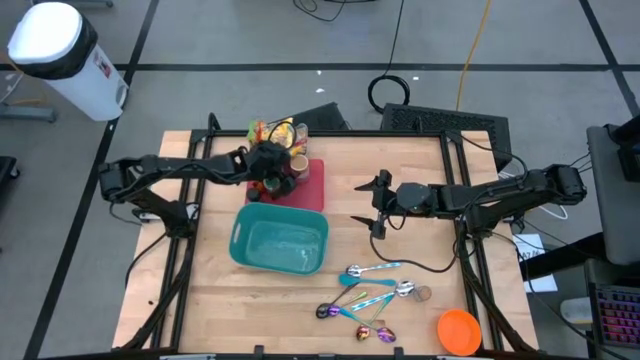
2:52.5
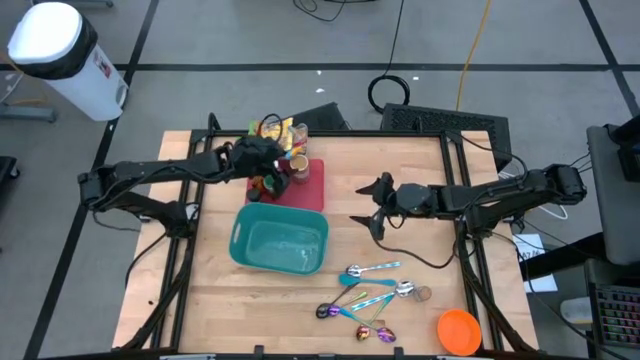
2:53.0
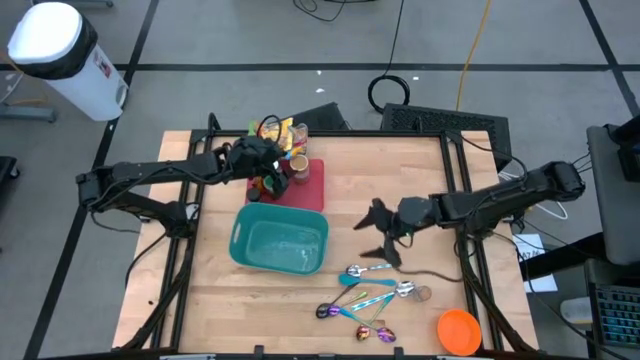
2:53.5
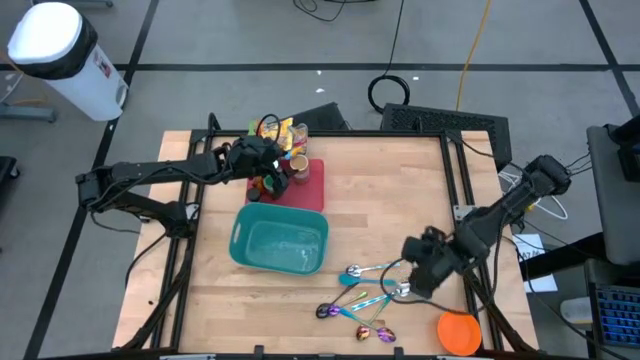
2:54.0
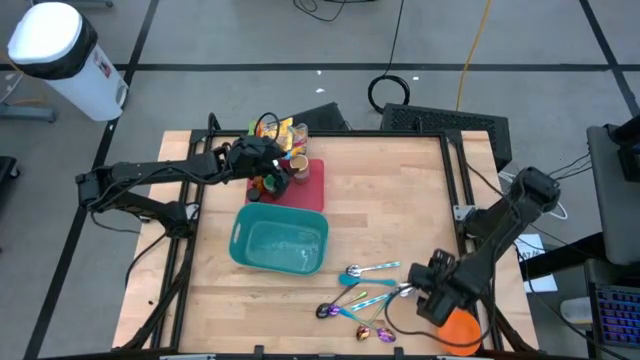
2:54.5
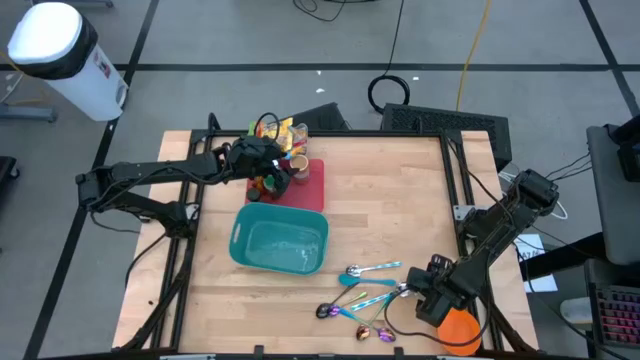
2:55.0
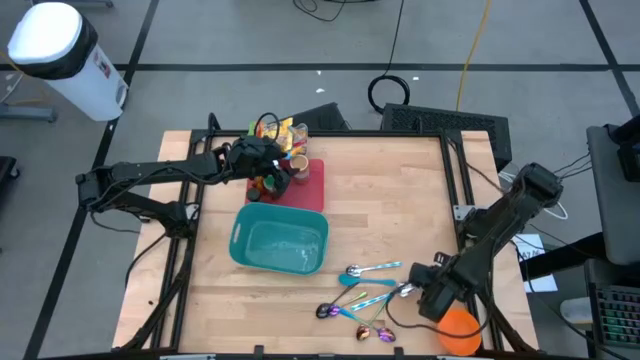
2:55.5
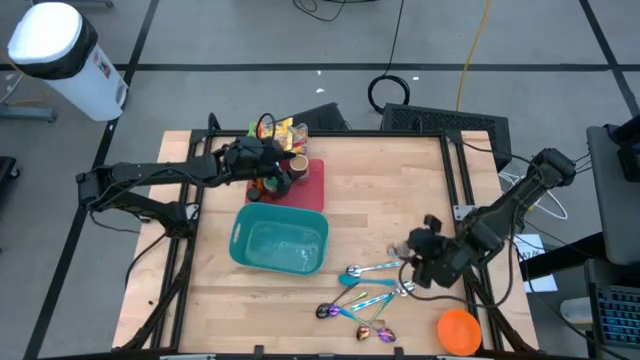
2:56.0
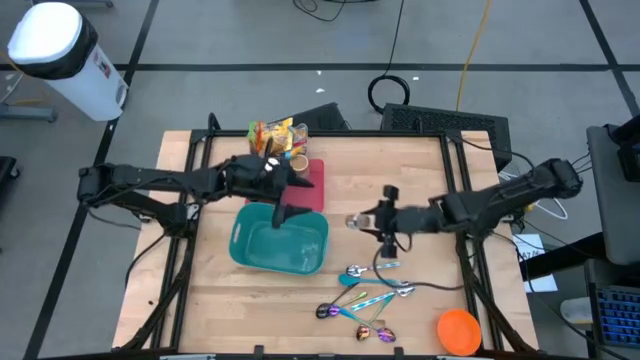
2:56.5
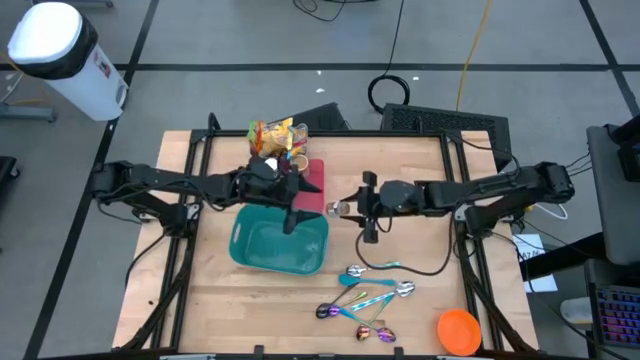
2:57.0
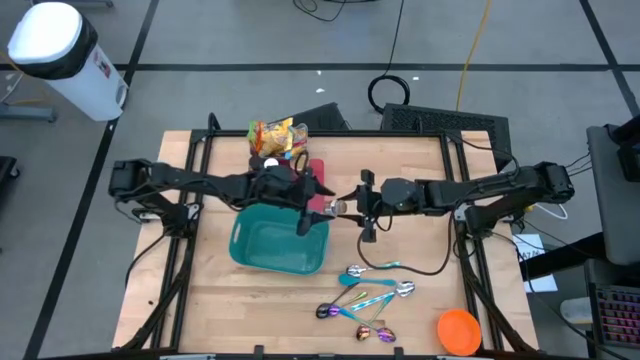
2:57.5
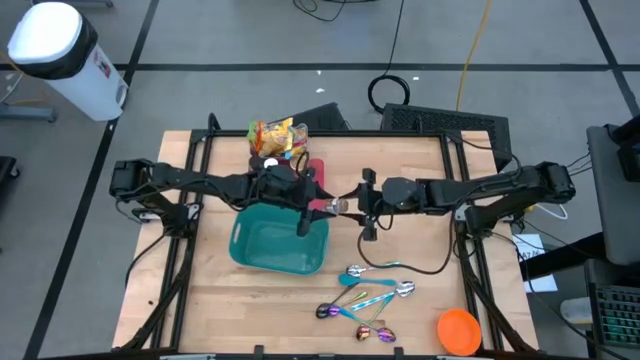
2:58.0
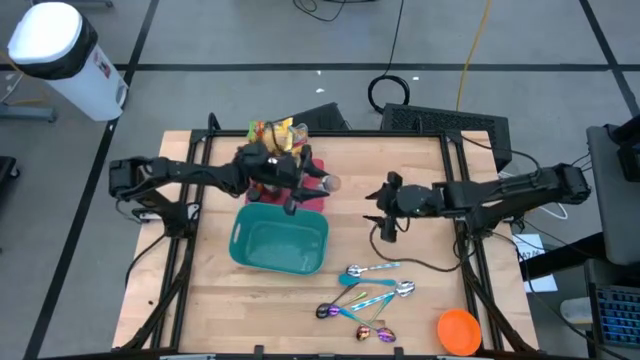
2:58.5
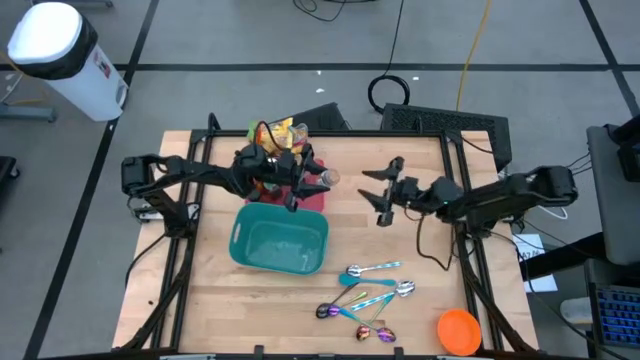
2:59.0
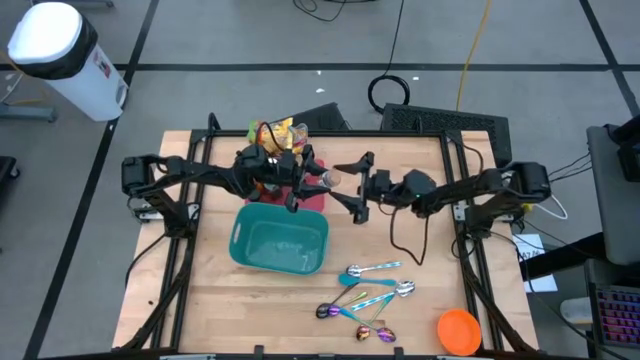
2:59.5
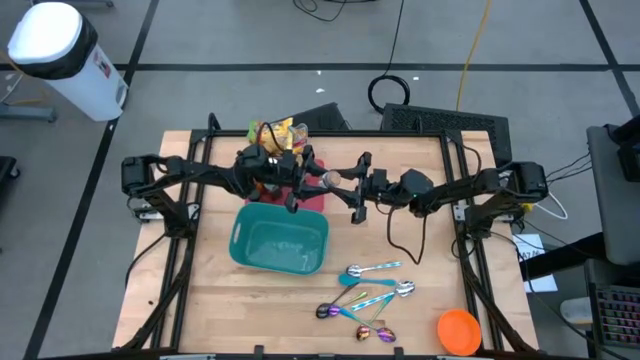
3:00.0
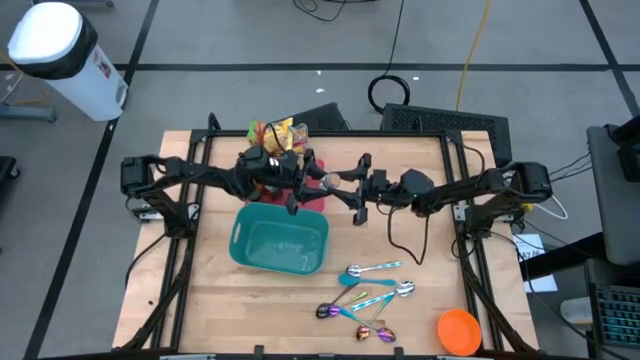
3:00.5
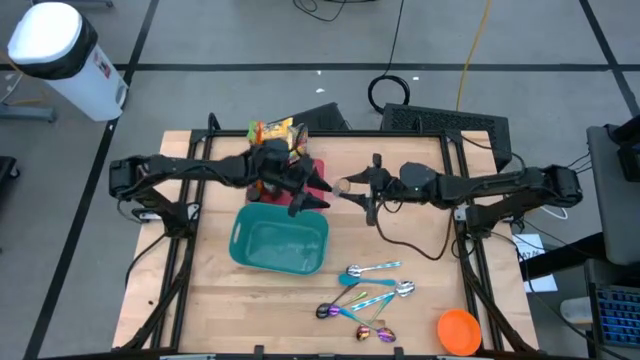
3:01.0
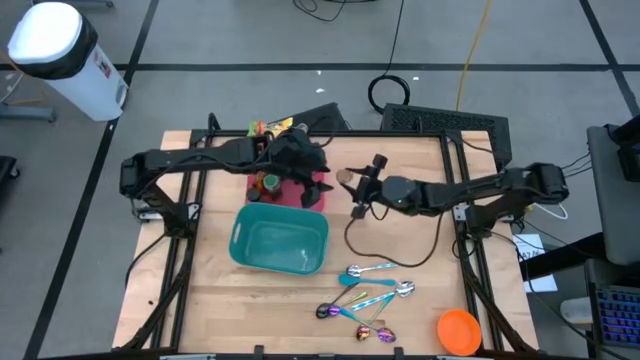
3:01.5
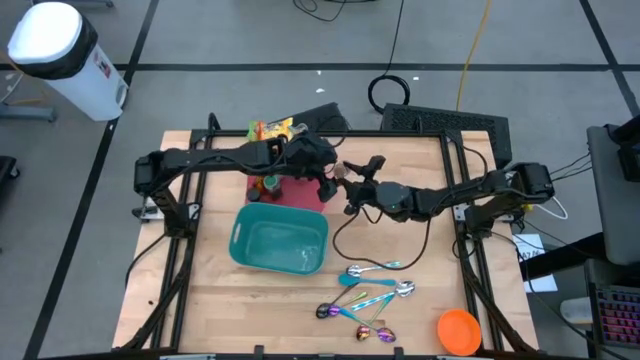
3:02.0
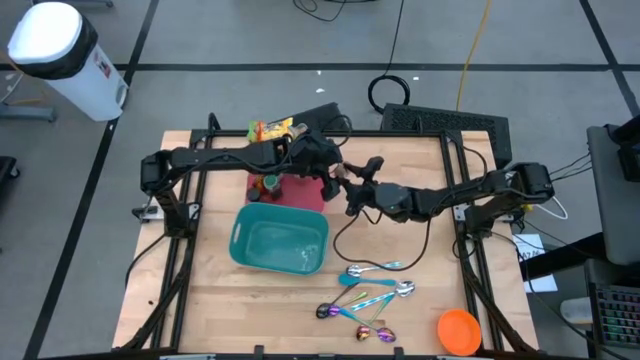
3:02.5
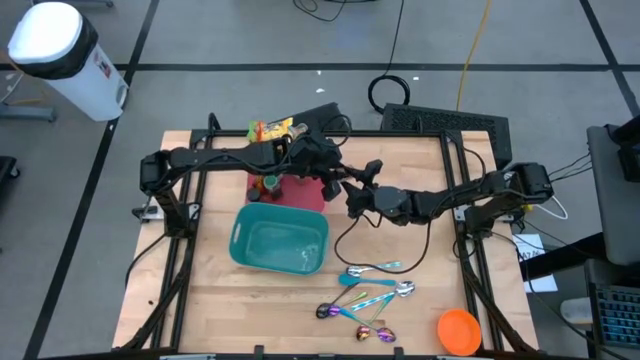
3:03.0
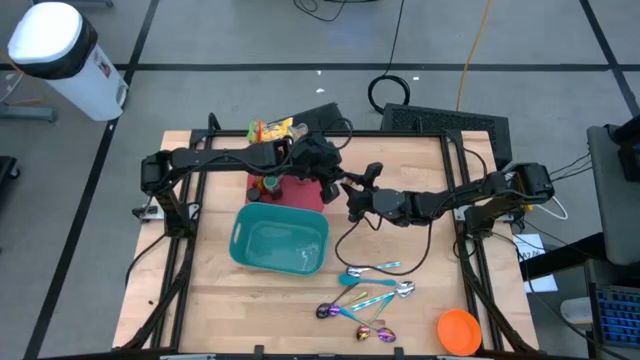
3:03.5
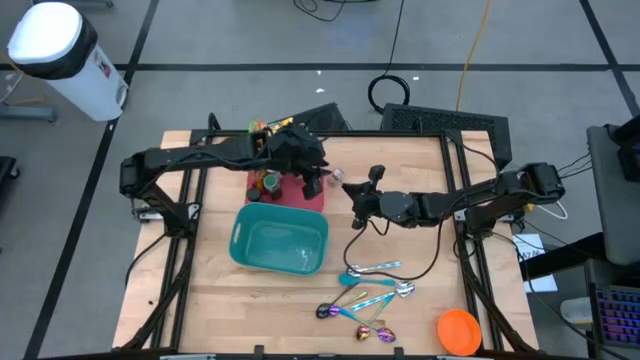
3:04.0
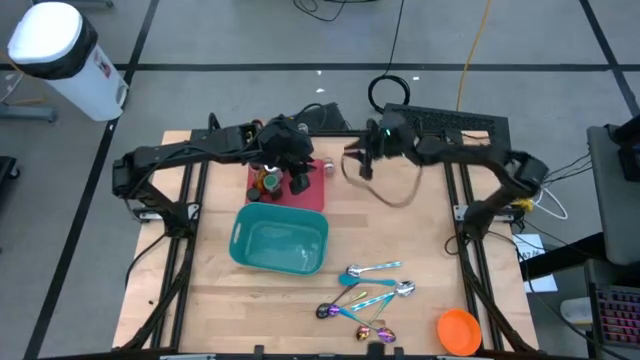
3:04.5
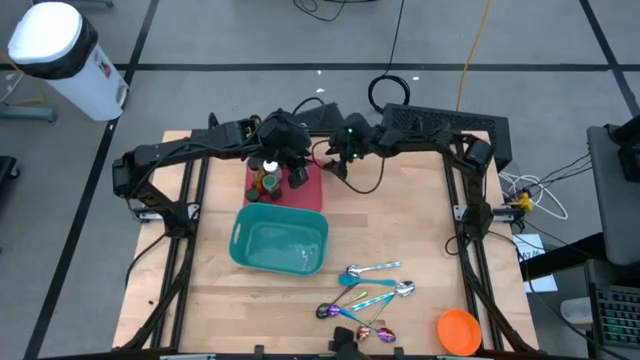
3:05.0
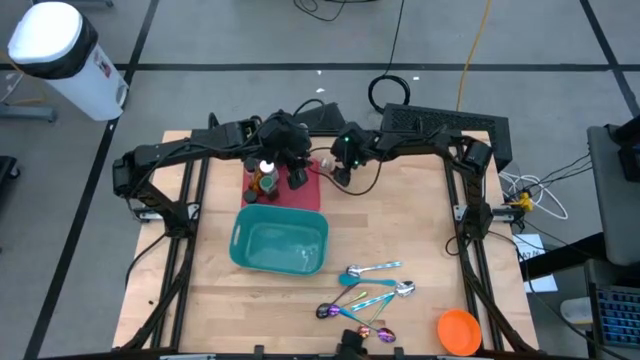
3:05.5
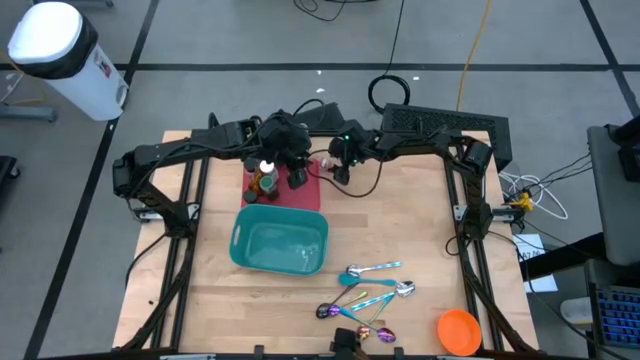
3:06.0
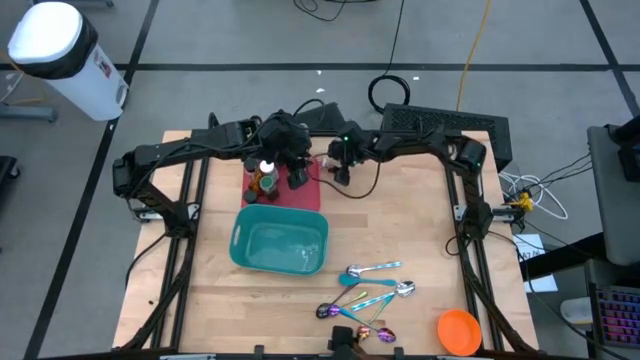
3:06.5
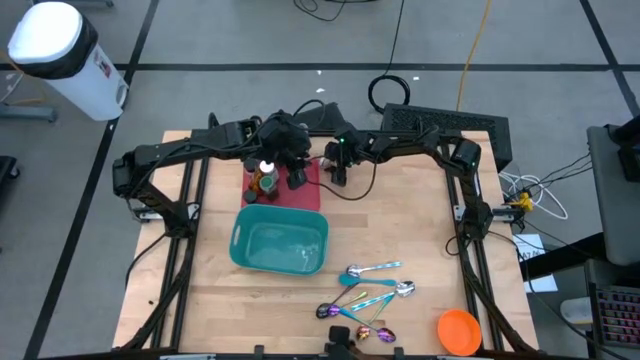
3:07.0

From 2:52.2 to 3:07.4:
Task: Pick & Place Food Item
Put the brown seasoning bottle into the red bin

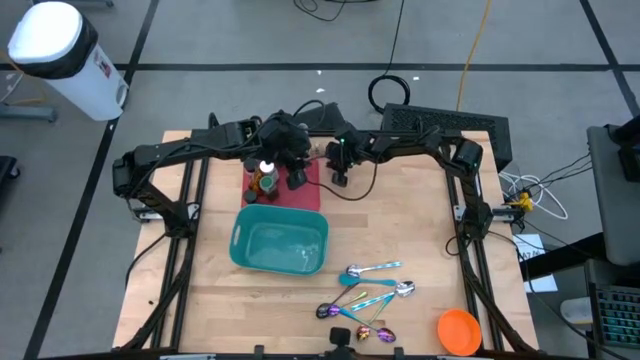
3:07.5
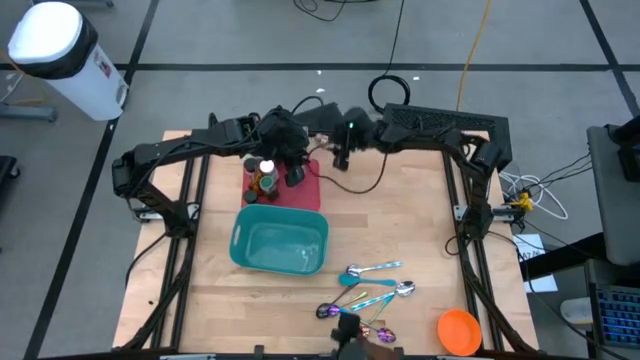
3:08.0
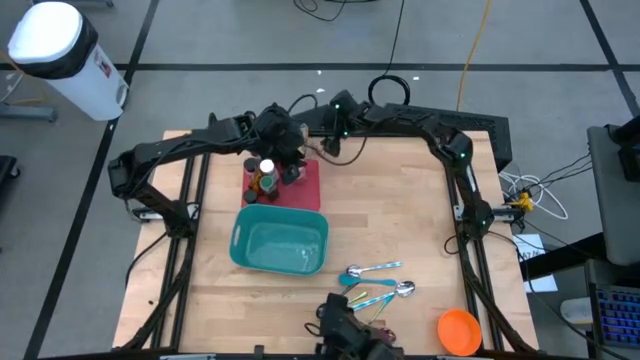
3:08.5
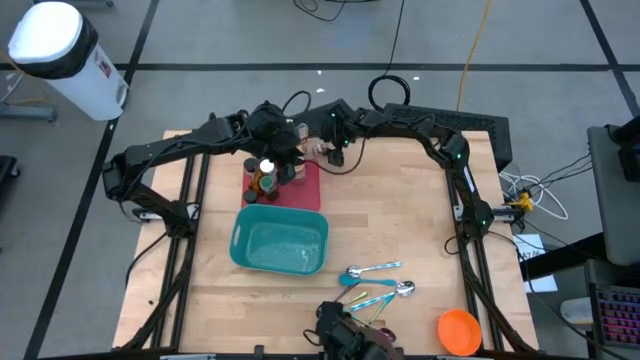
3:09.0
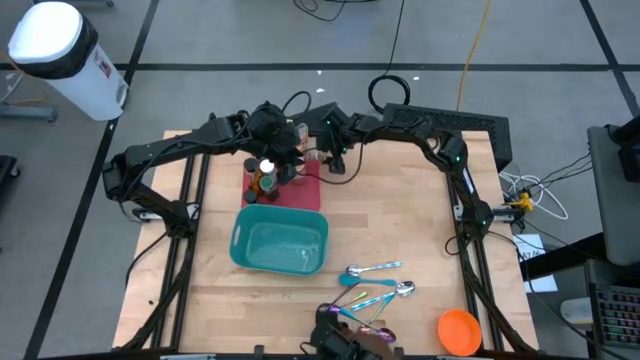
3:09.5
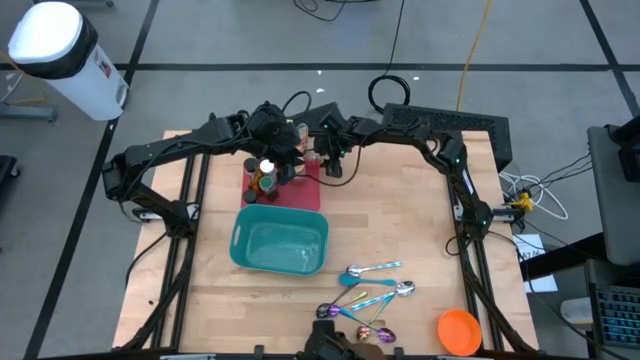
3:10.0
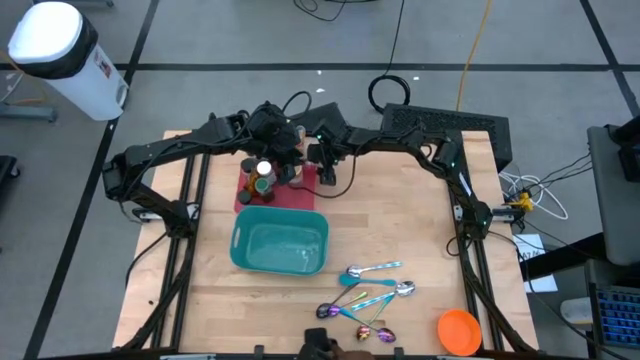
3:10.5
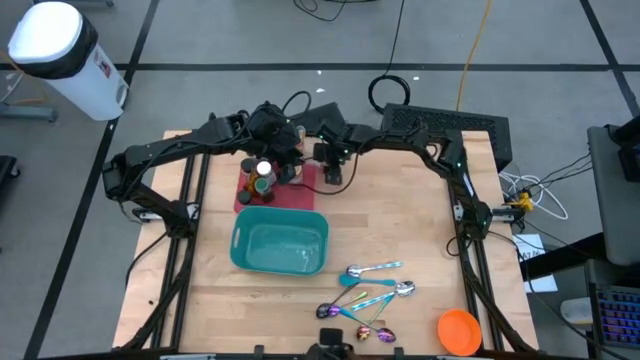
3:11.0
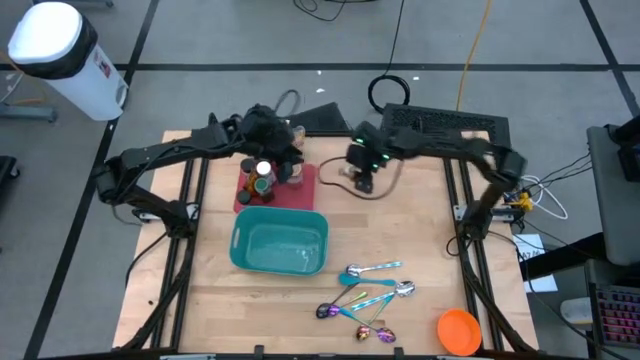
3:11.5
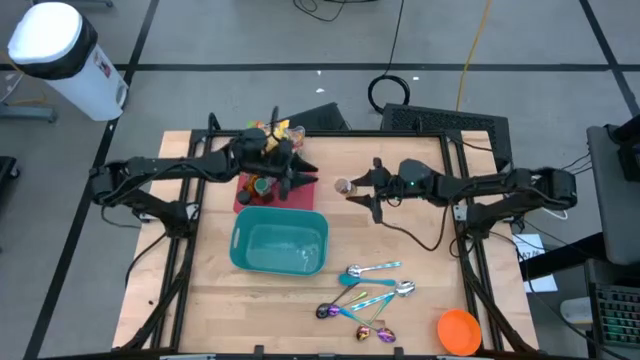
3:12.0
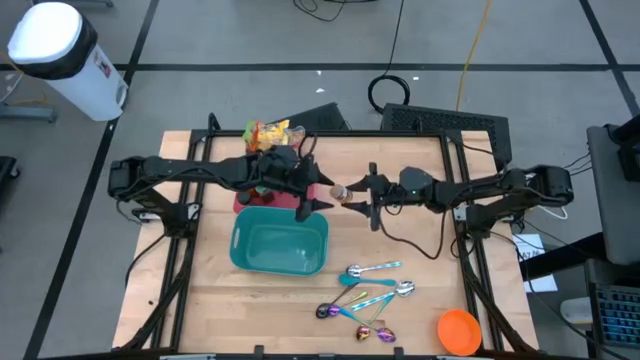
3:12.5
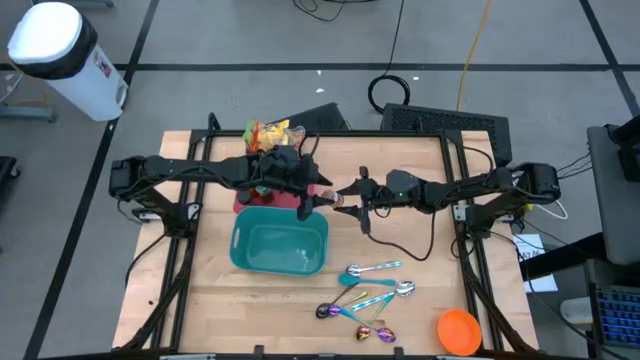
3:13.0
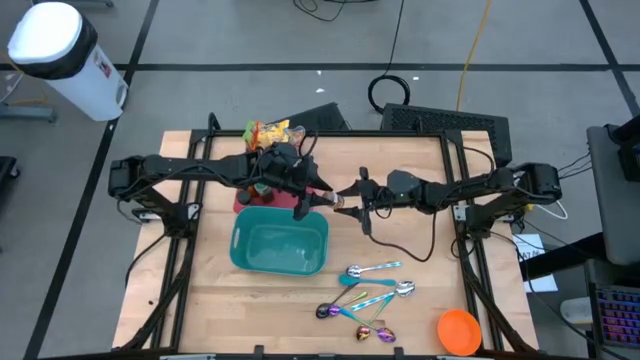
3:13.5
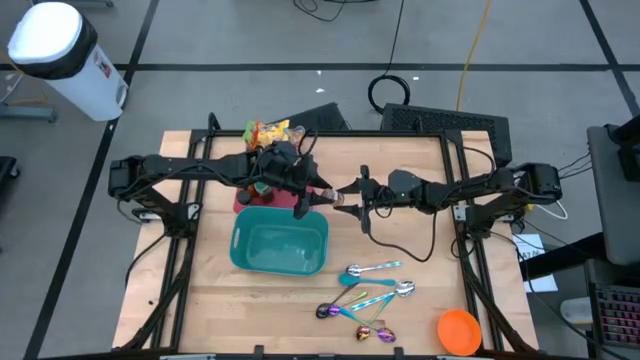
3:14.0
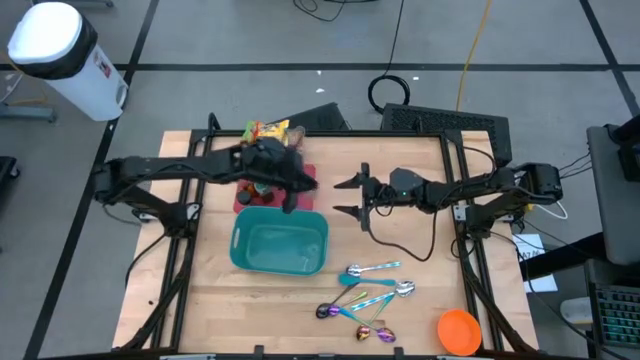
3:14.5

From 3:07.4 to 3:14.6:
Put the brown seasoning bottle into the red bin
